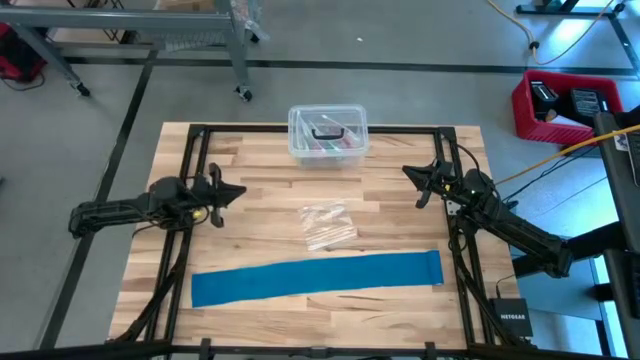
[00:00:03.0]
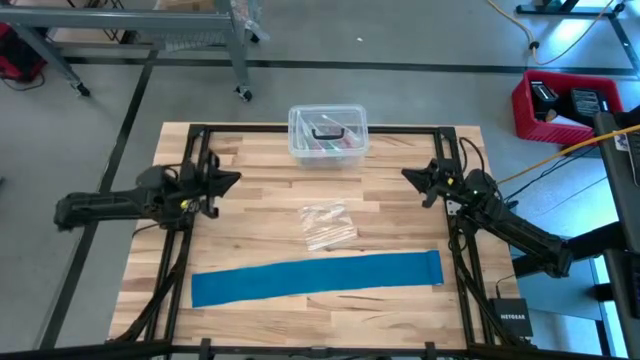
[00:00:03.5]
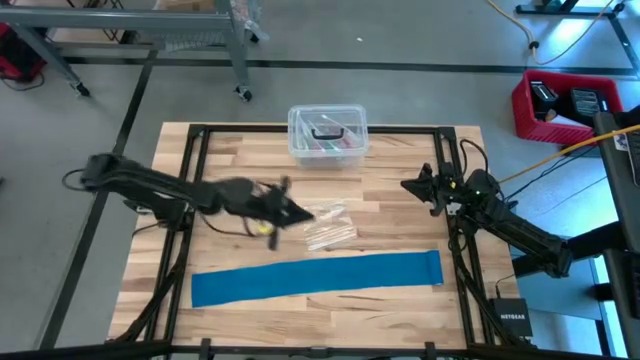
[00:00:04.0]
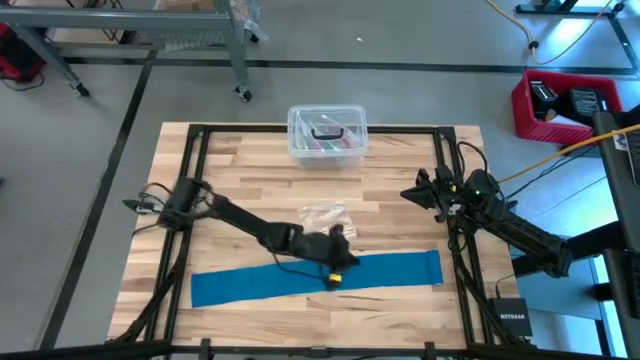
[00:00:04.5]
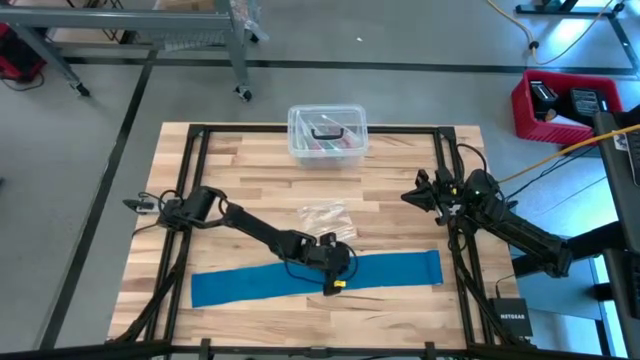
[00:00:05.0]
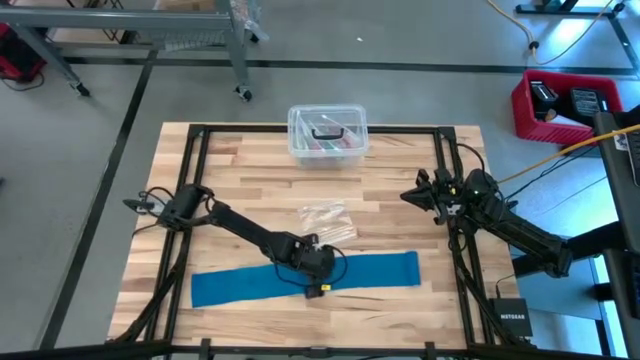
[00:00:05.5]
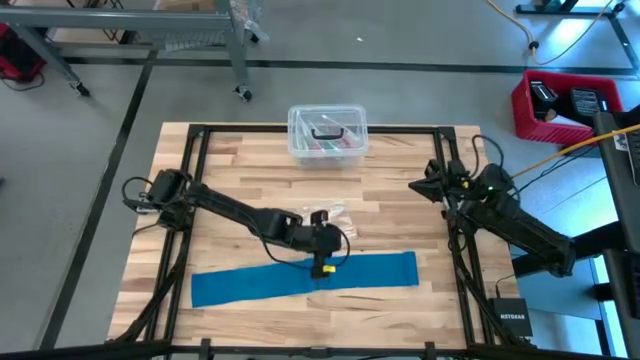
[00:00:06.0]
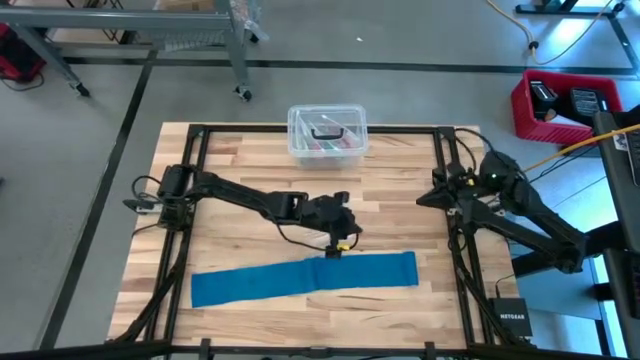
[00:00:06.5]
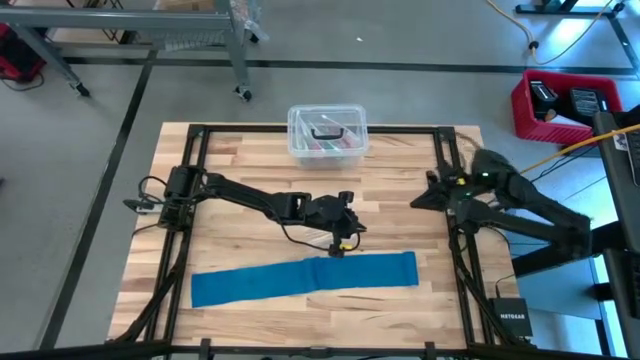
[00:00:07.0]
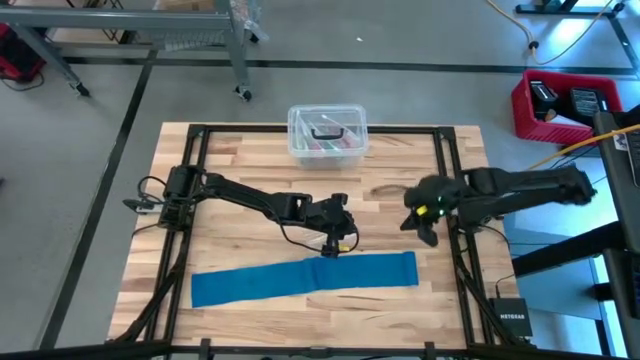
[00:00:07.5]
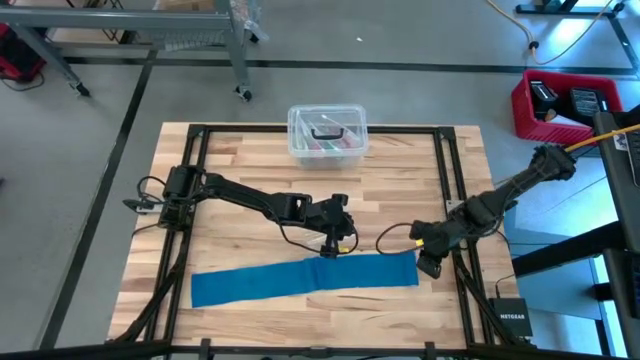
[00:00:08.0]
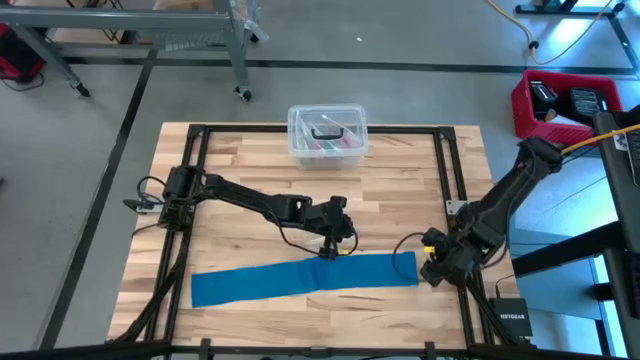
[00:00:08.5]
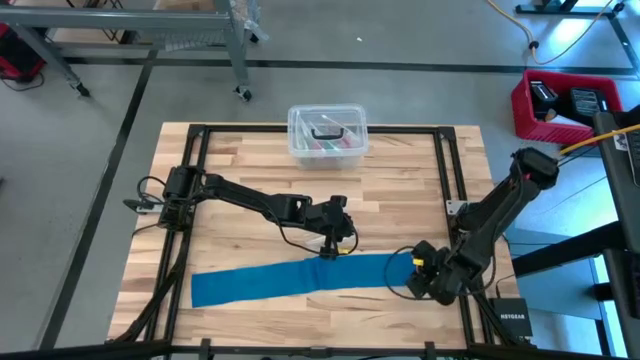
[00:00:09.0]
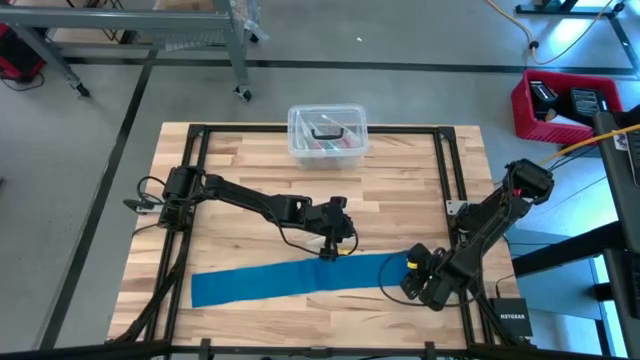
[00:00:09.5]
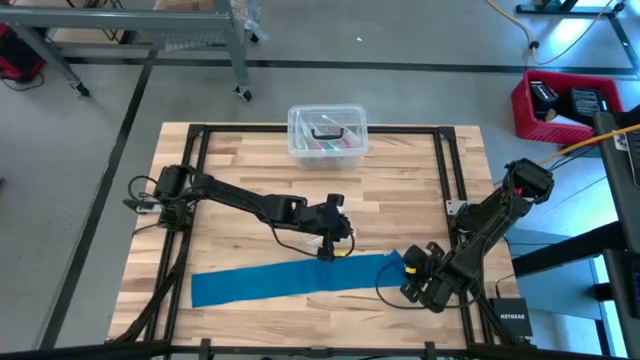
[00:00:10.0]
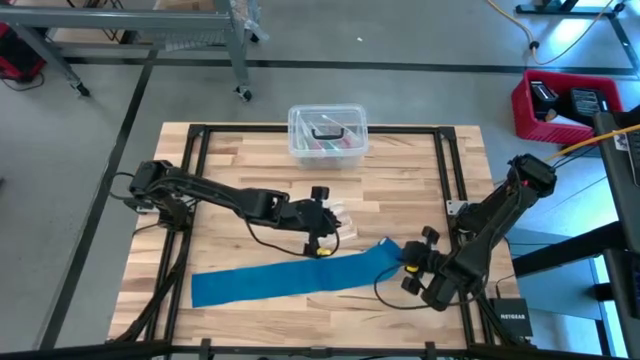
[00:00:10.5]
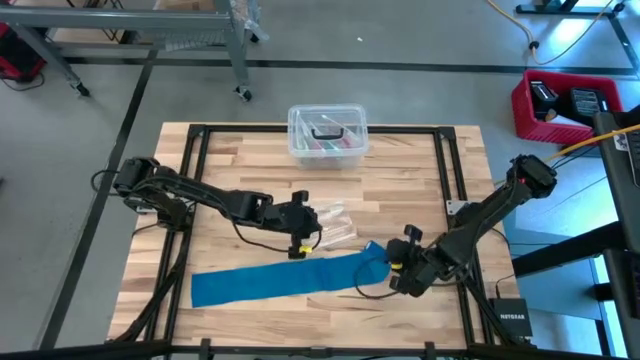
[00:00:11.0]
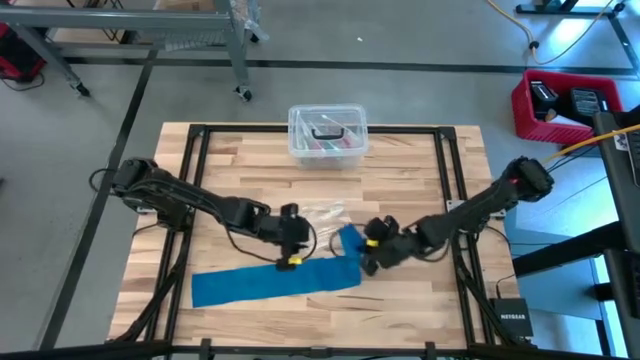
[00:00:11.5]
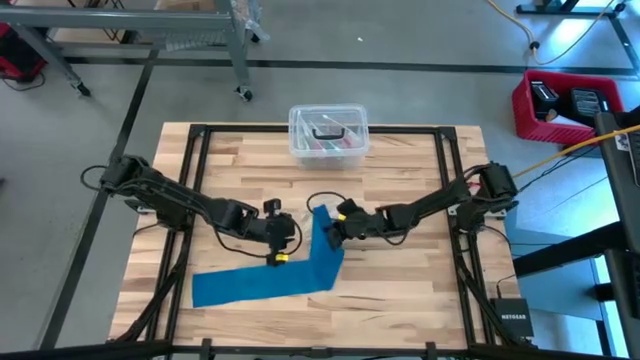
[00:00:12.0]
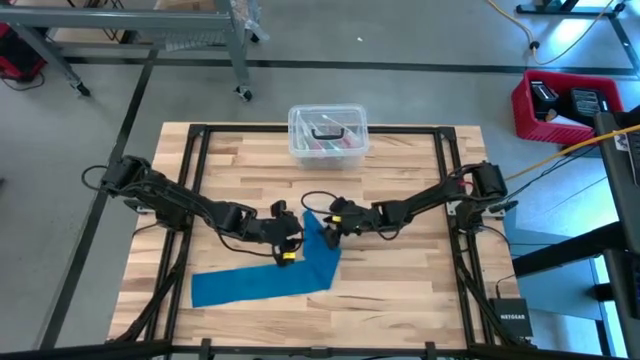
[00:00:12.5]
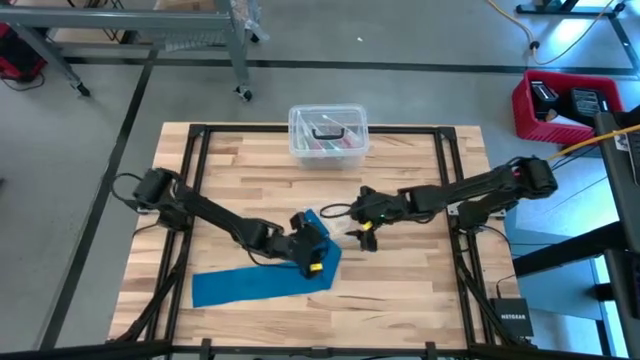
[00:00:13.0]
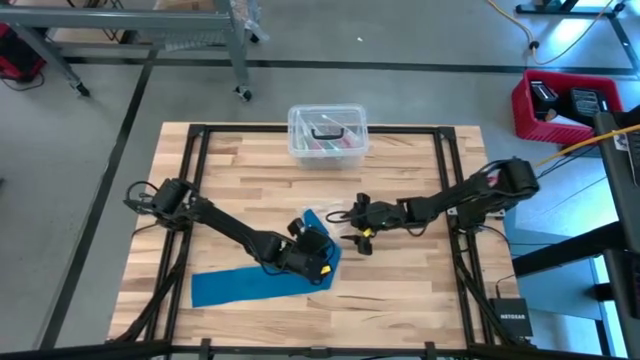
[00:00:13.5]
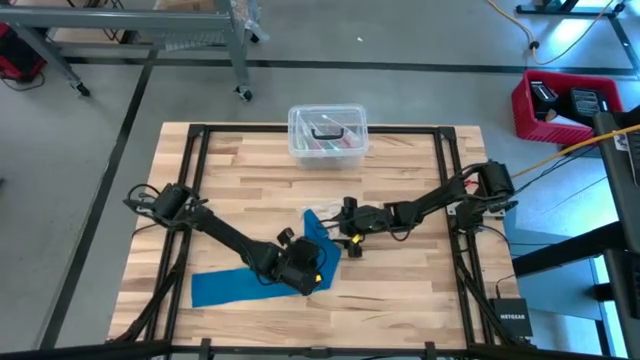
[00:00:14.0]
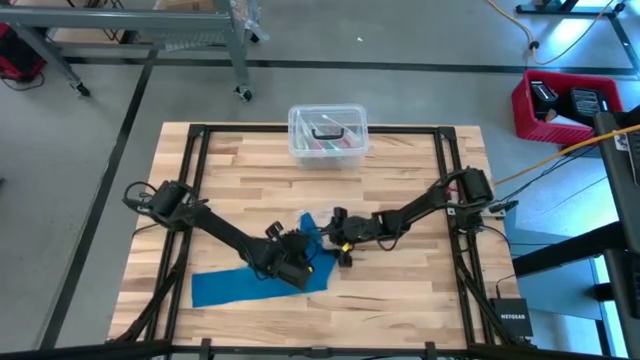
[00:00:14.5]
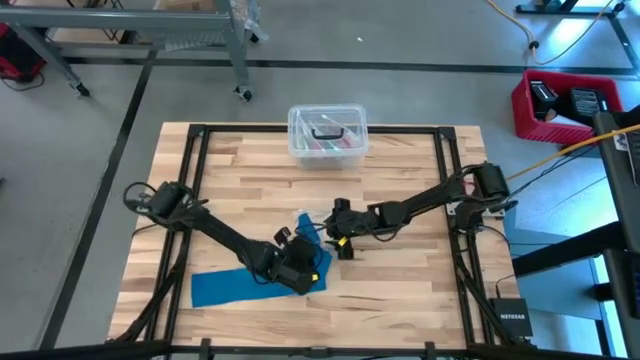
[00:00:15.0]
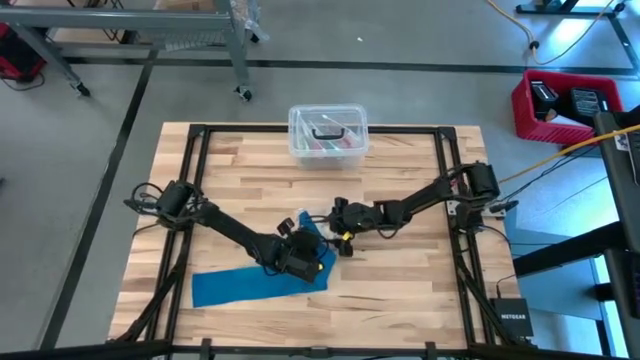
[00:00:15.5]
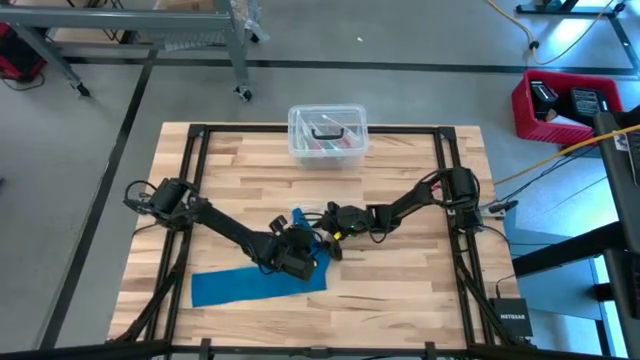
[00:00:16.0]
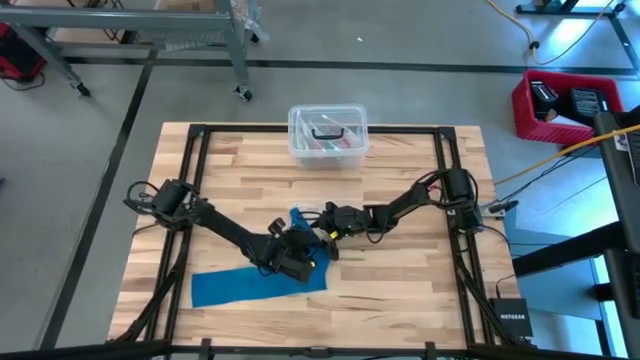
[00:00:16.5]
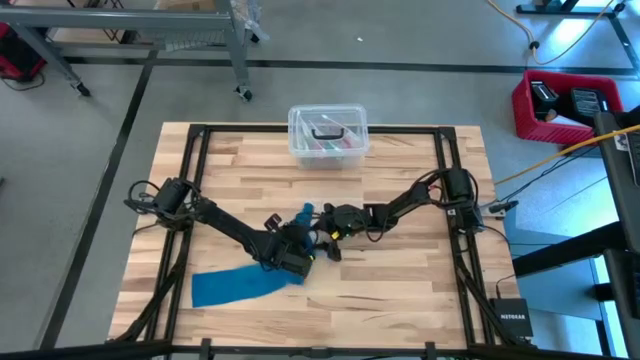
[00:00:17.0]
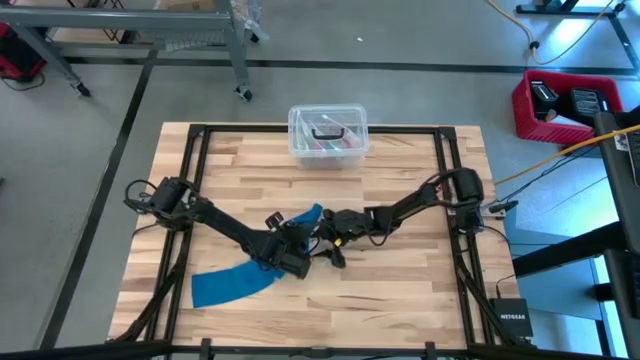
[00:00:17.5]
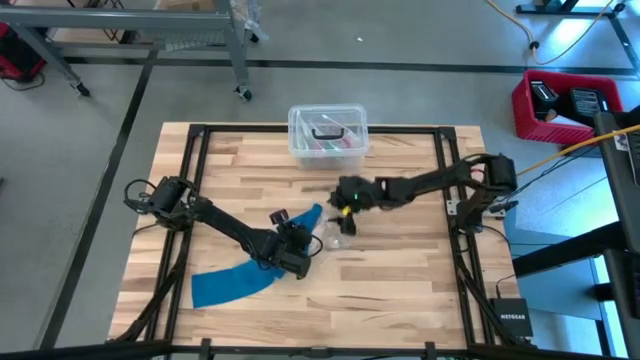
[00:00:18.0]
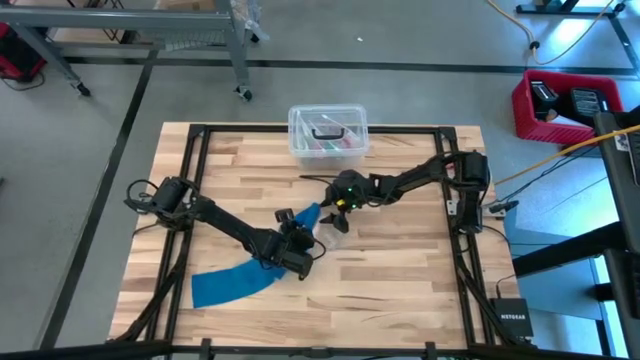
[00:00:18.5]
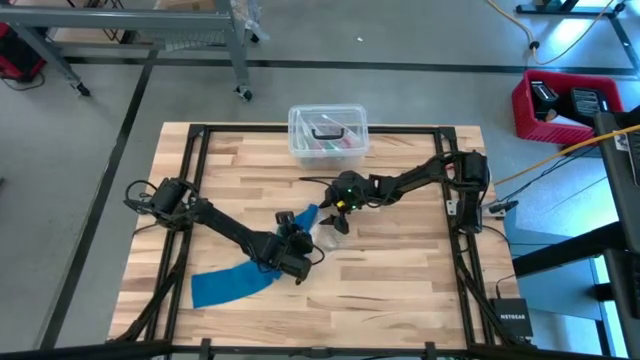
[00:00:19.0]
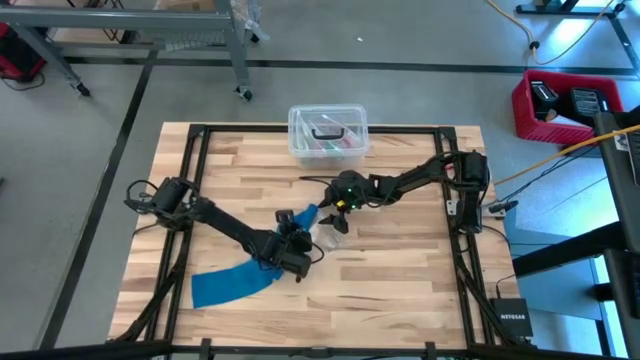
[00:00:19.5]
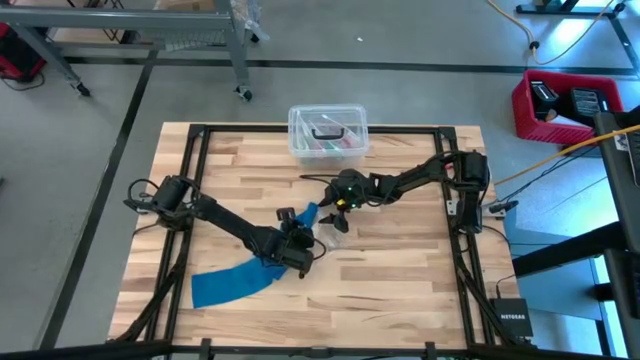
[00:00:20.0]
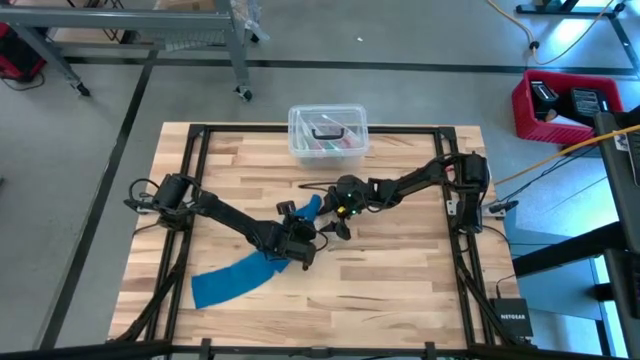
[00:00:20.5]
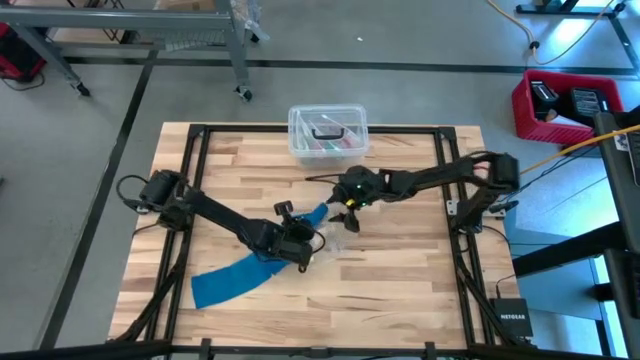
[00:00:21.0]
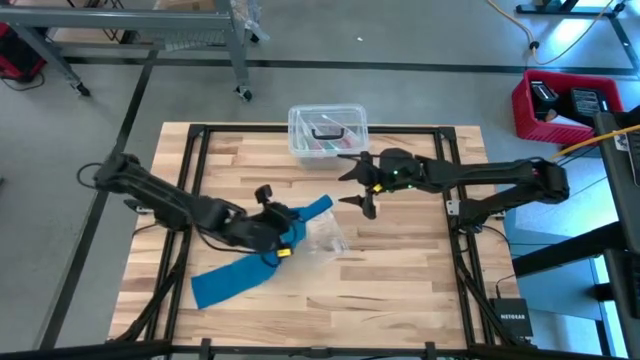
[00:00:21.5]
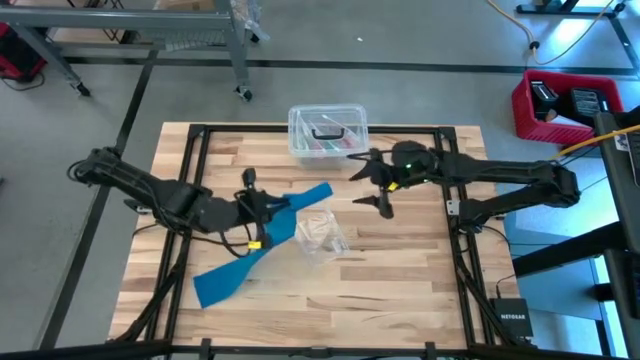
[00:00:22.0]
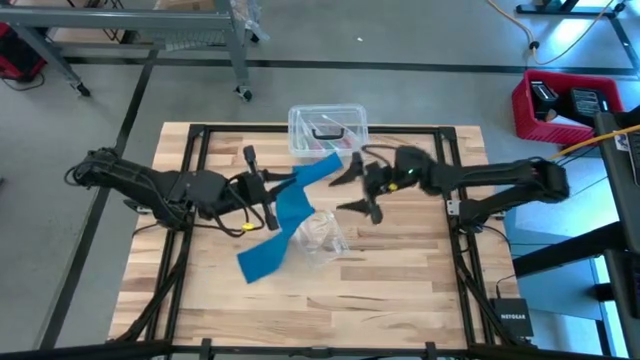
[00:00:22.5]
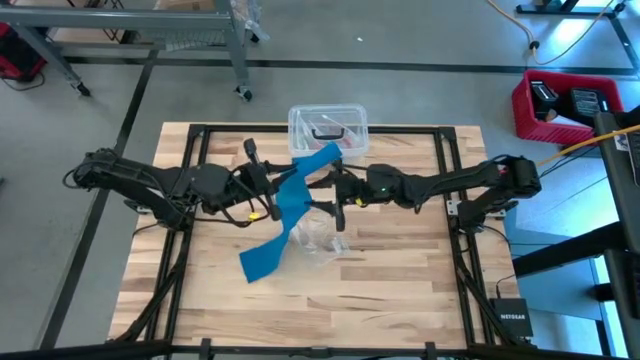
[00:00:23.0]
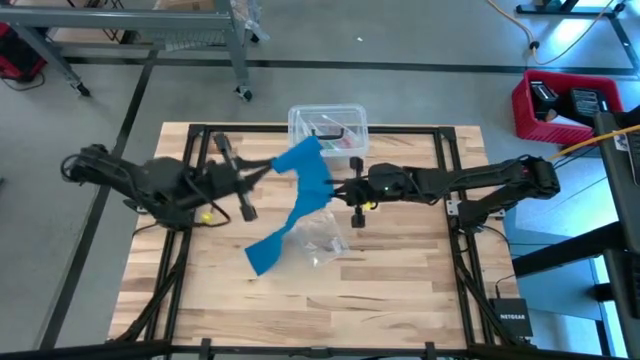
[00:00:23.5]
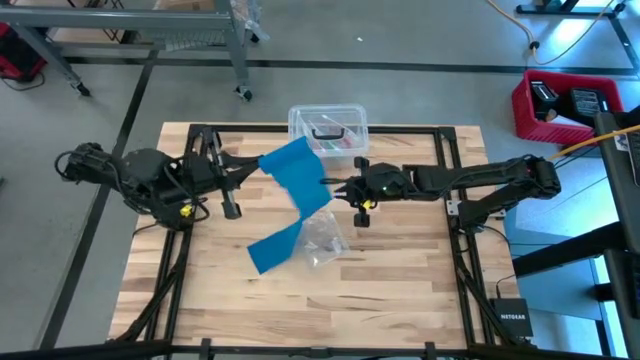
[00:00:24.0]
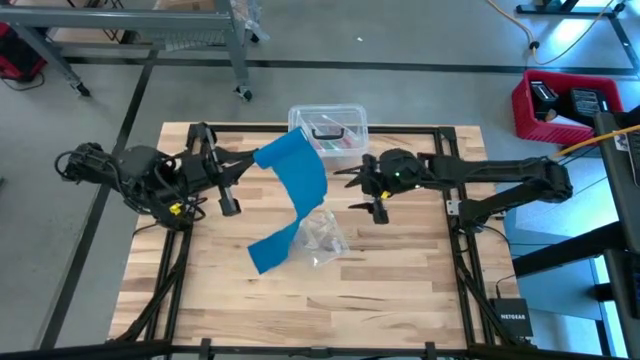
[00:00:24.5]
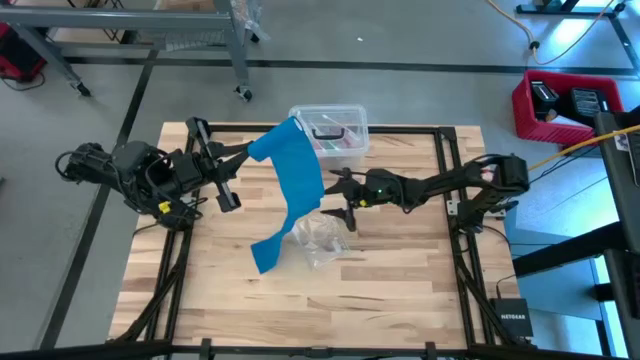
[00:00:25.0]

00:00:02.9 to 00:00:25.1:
Task: Roll bandage
Roll the blue bandage
